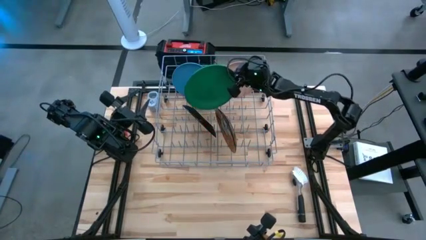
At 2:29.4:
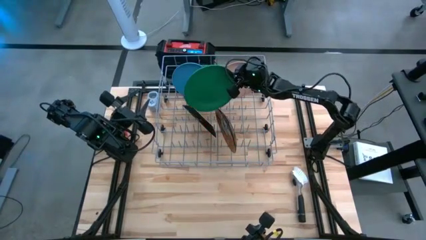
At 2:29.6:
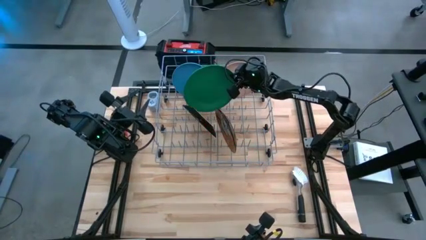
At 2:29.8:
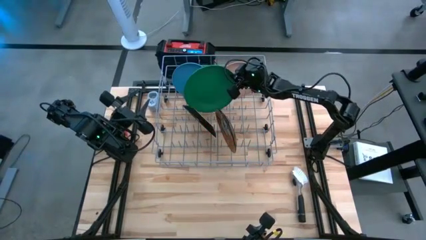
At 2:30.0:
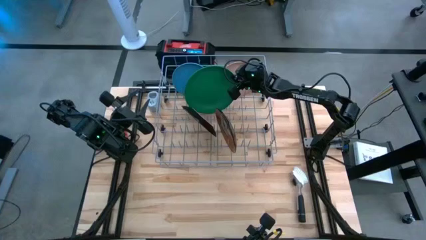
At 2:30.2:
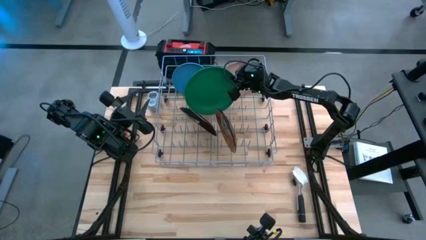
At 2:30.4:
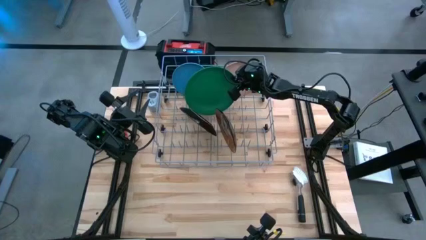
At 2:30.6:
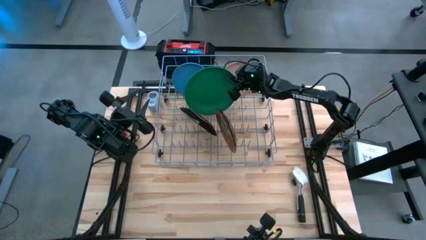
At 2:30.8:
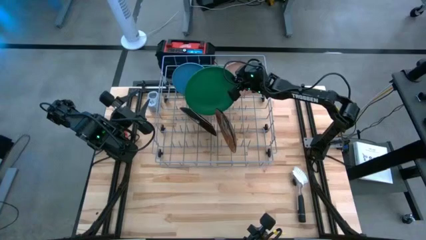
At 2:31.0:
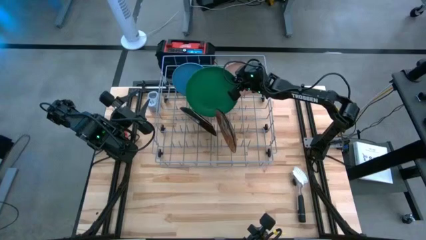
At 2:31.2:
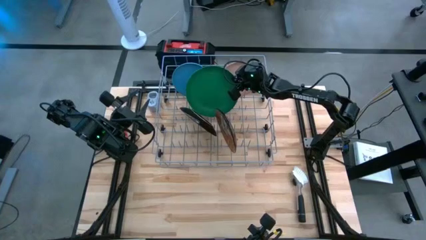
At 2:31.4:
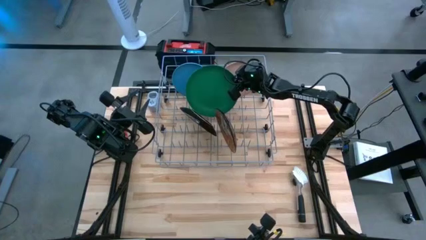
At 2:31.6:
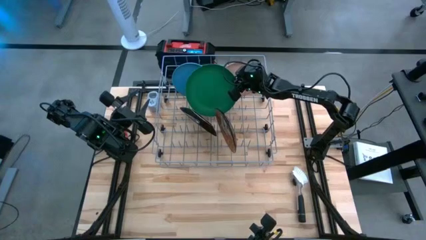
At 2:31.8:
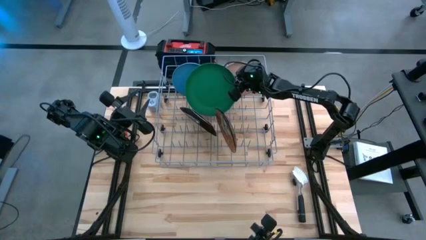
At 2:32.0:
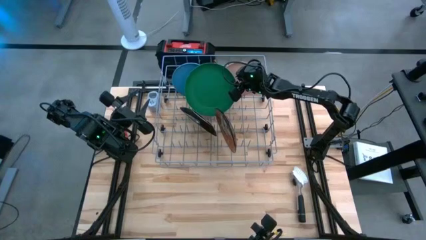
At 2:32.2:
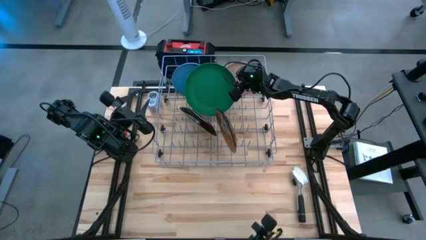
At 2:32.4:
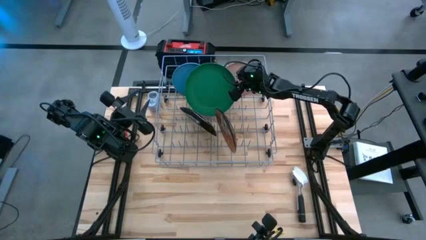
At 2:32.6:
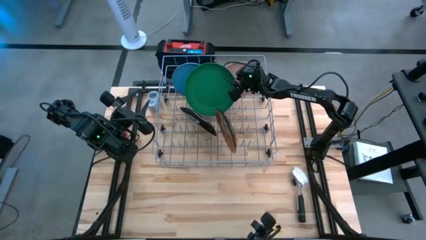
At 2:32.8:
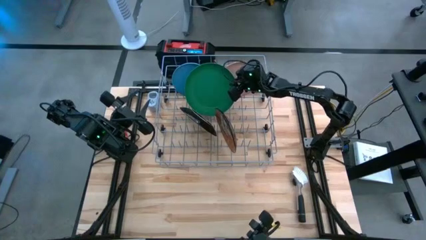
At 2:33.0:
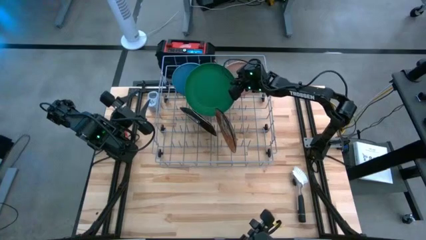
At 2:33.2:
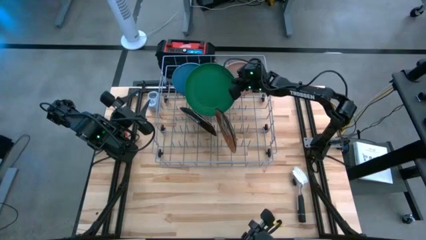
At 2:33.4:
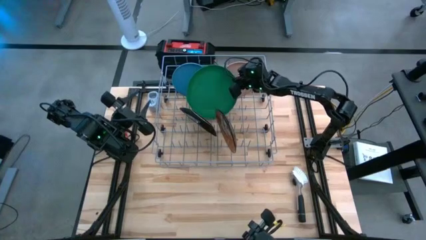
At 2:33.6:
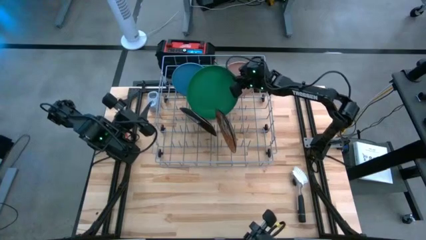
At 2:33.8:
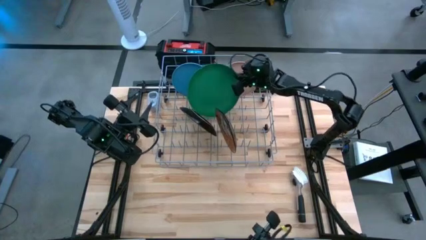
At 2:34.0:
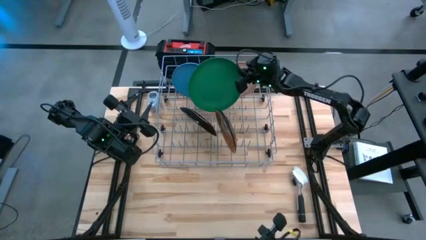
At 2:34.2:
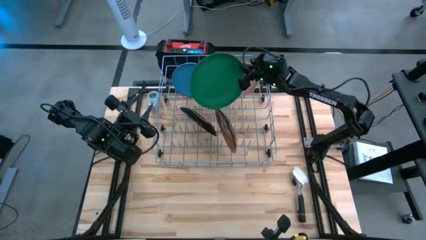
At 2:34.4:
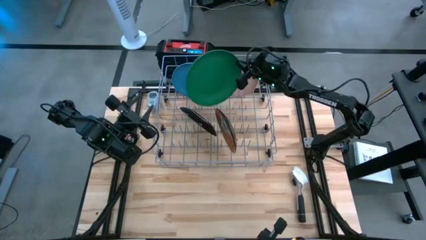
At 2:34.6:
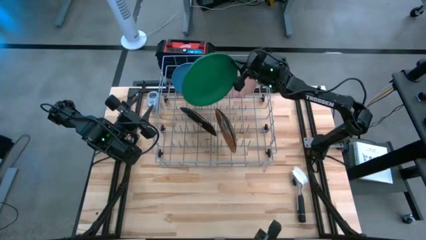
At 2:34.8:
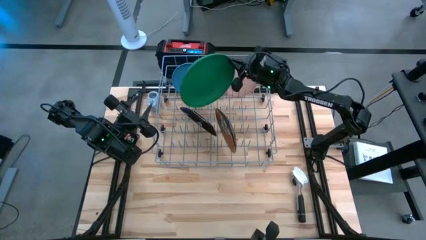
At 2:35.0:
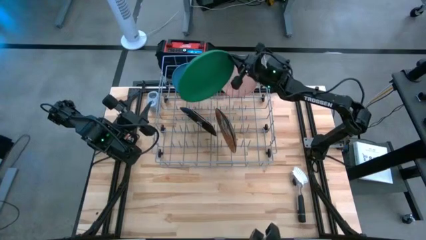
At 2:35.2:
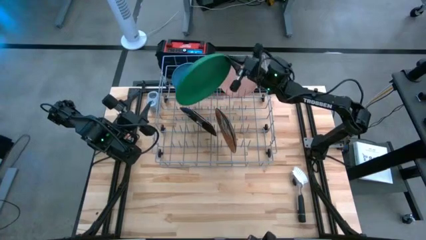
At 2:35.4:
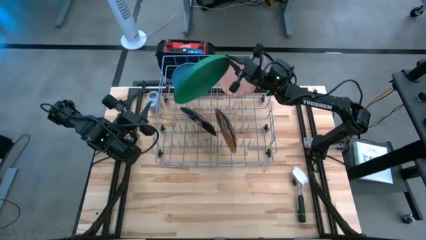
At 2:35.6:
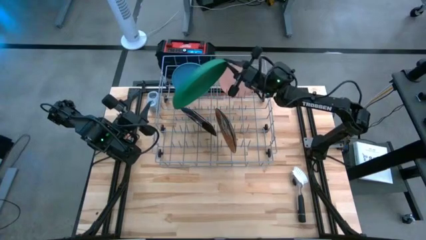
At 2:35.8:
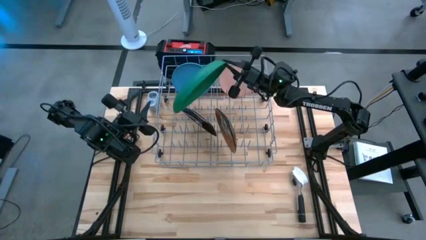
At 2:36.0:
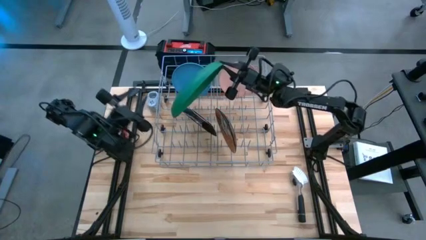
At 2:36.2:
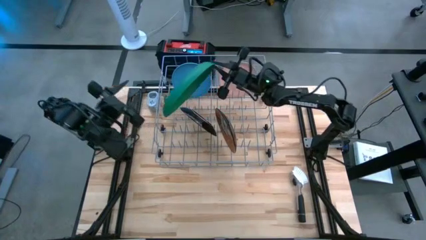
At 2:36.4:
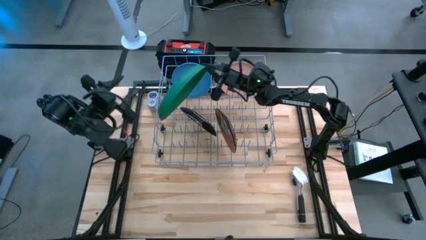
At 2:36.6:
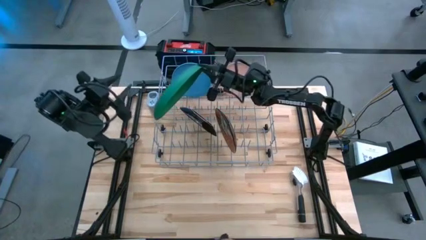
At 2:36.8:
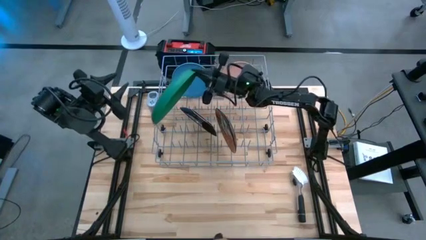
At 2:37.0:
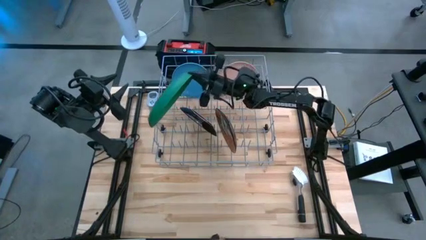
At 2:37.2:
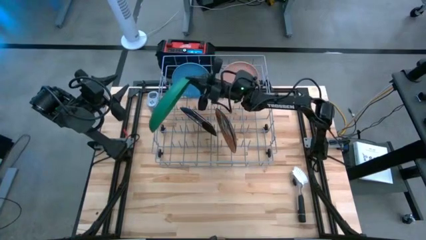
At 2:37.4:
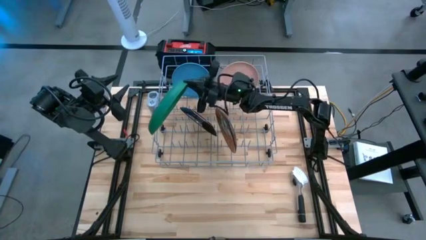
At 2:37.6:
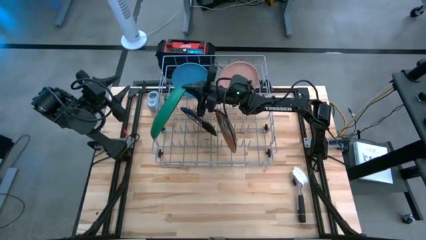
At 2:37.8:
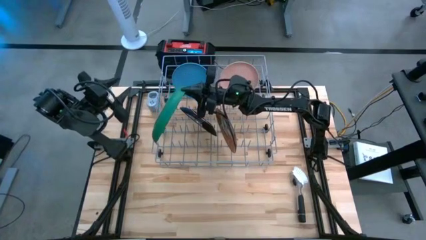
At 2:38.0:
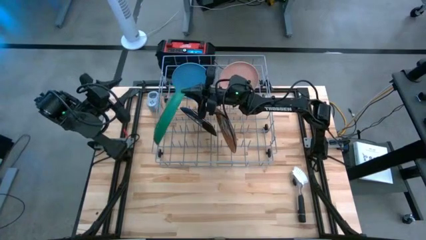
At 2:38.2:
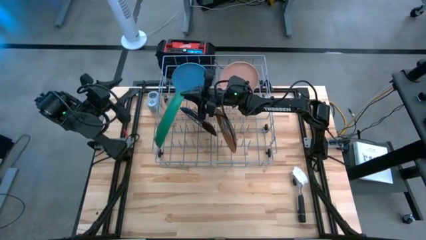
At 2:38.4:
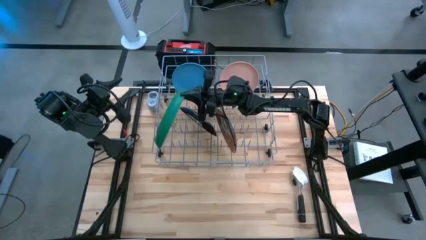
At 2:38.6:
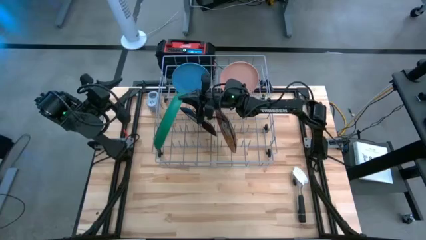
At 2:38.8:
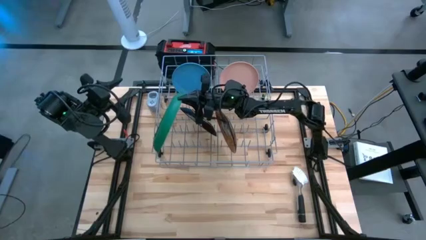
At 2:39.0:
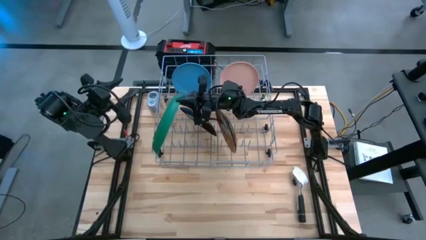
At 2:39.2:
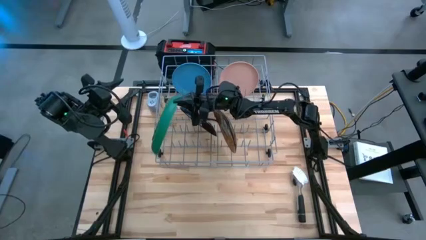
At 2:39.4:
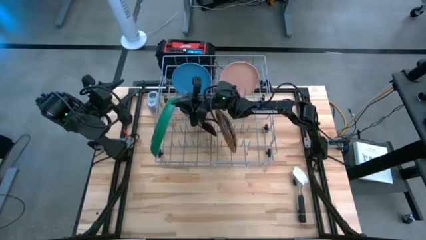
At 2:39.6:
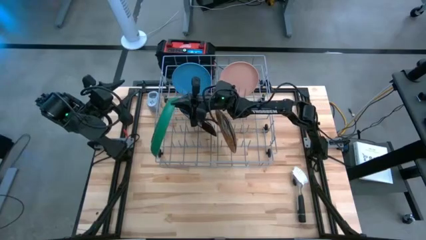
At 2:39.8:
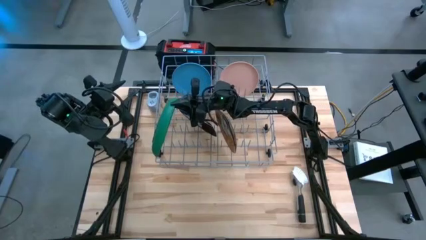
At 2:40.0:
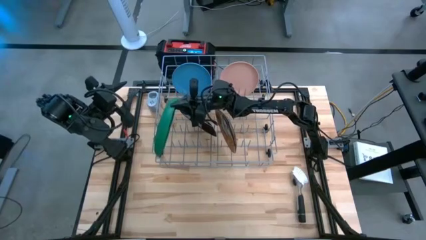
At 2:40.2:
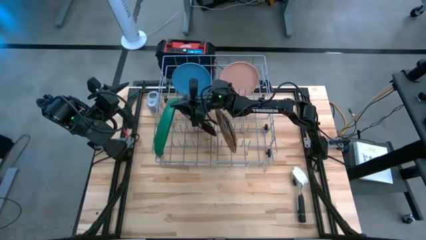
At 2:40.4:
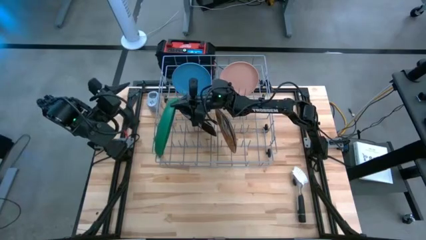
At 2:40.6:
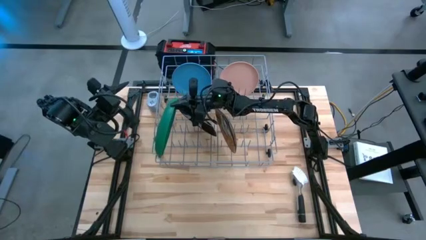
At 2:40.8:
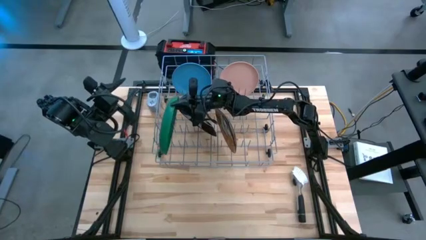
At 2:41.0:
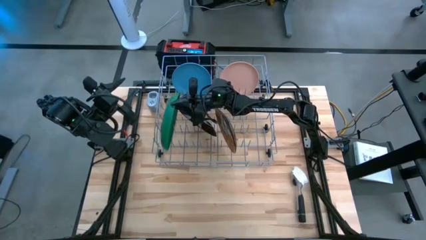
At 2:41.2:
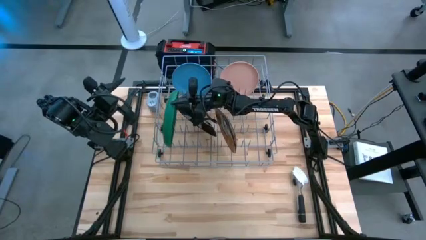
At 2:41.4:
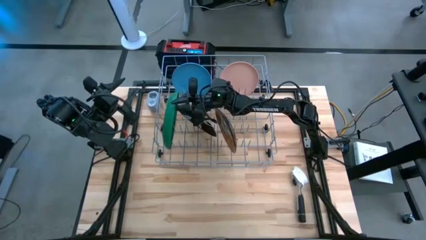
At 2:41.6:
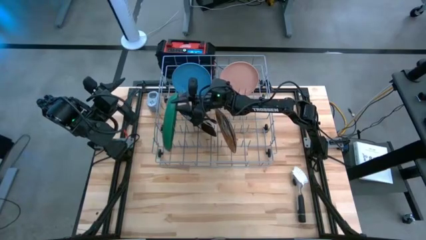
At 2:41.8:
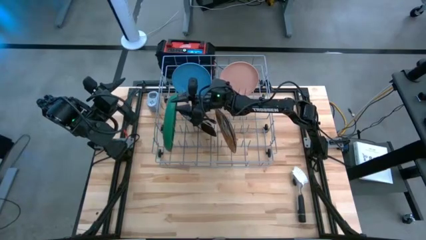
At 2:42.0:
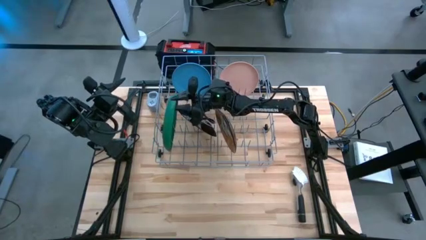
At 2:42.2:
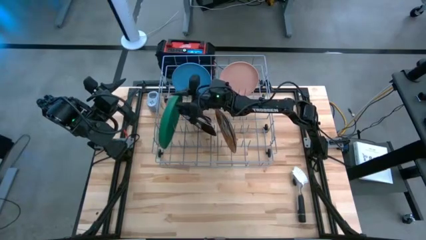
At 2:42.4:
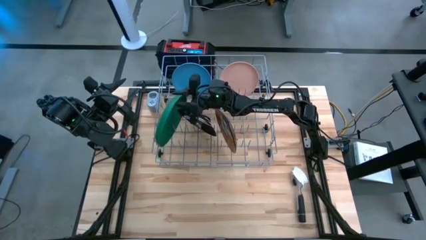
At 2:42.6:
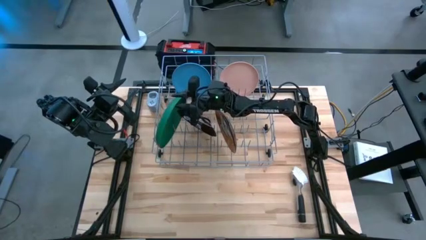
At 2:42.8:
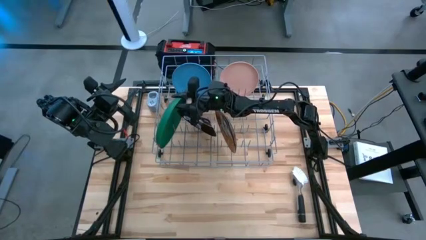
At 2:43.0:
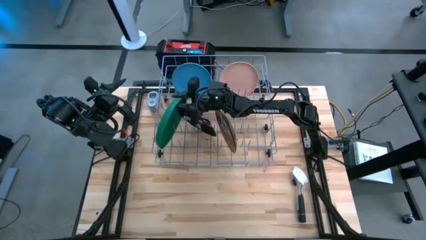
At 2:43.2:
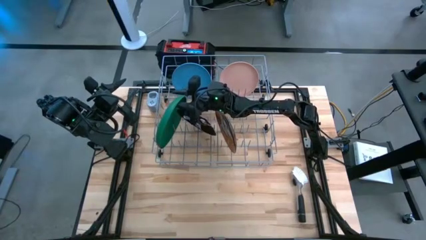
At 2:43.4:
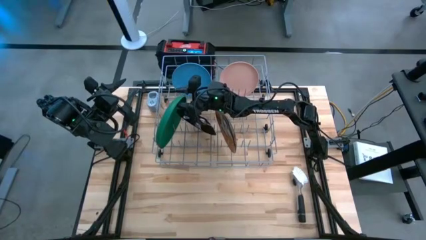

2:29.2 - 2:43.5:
Task: Sort dishes
Put the green plate into the dish rack

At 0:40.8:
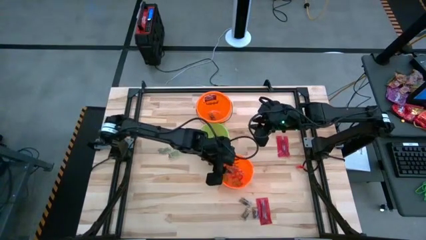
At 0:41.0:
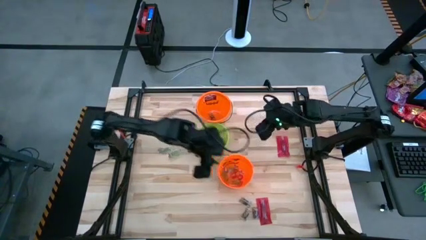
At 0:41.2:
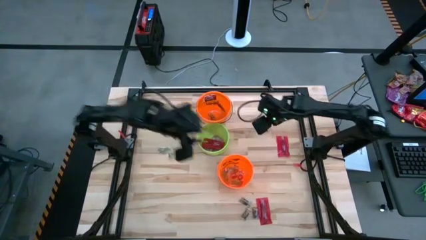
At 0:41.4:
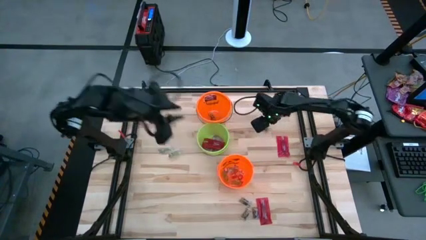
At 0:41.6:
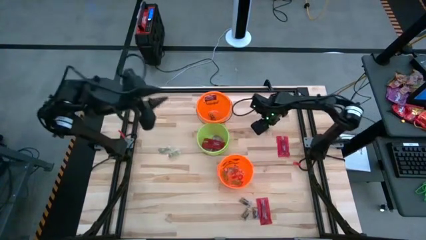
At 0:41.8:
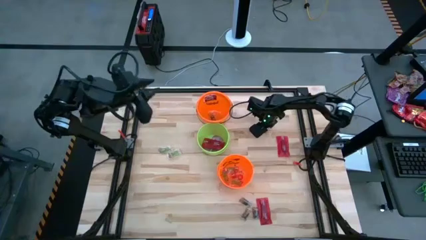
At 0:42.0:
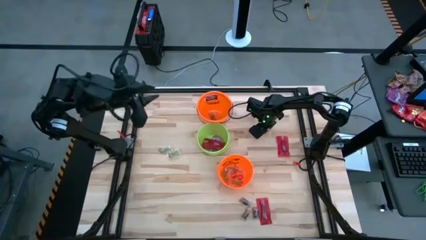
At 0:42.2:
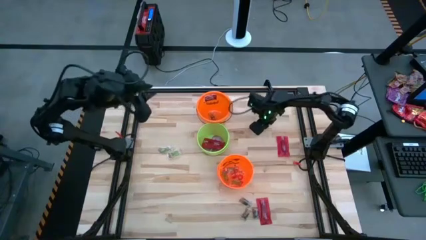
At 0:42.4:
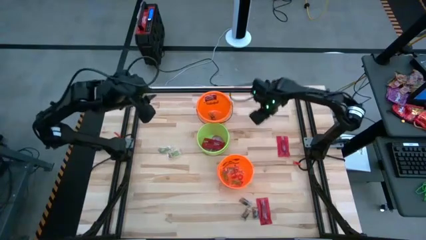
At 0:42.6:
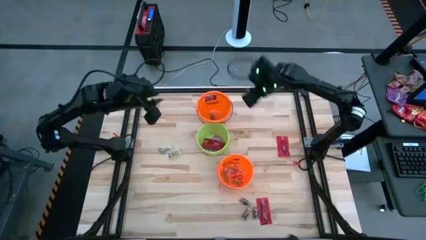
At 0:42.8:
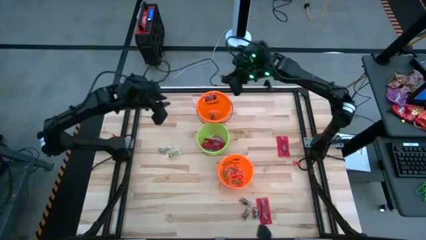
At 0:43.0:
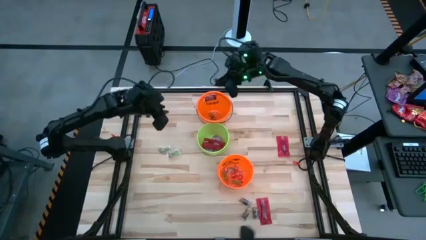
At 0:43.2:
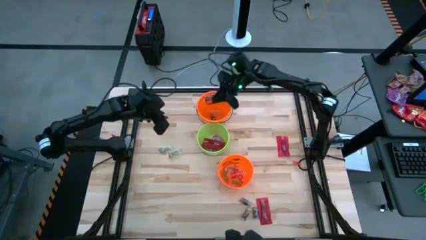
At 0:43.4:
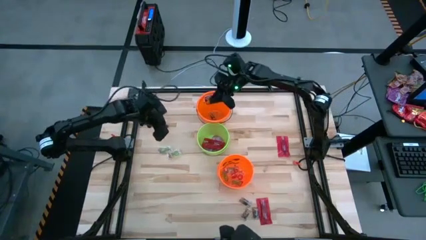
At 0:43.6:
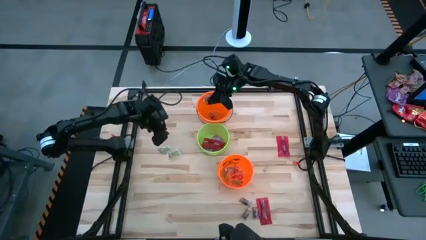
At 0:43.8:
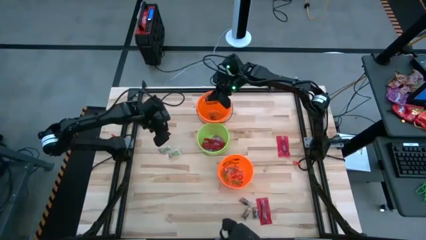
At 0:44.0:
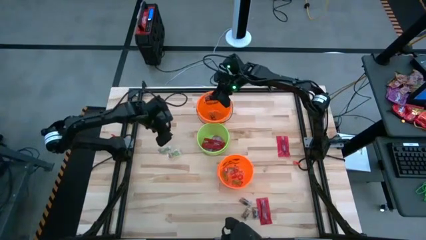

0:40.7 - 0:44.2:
Task: Sort candy by brand, put in halloween buckets
Put the black gummy into the top orange bucket
